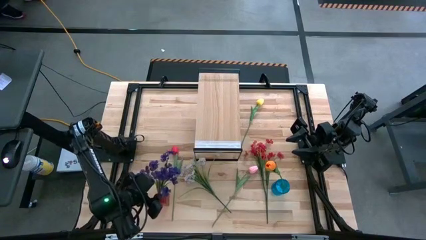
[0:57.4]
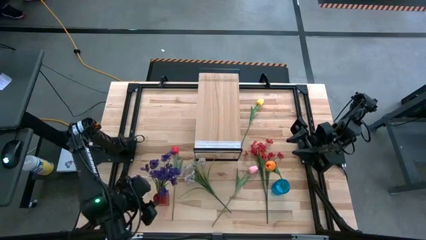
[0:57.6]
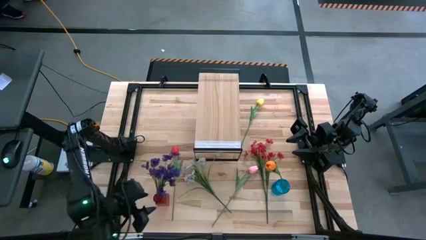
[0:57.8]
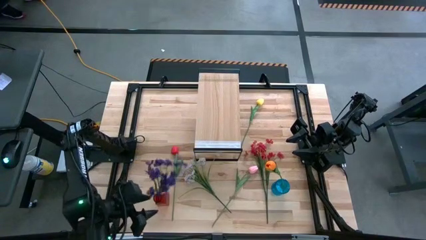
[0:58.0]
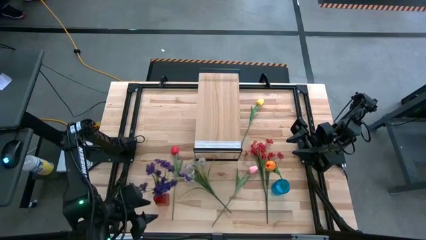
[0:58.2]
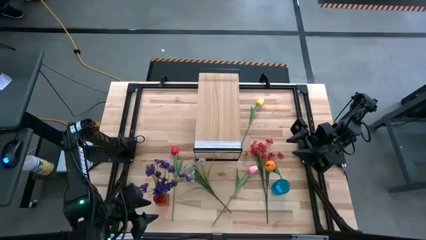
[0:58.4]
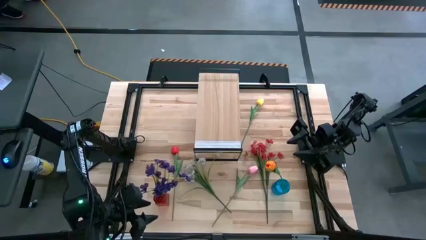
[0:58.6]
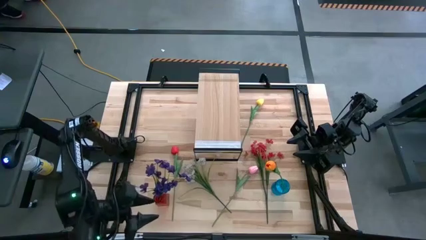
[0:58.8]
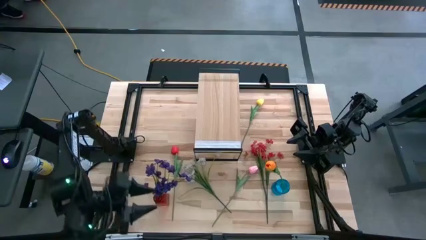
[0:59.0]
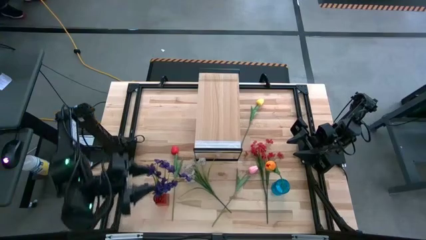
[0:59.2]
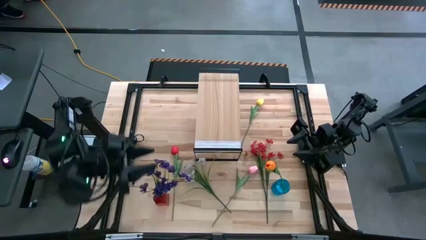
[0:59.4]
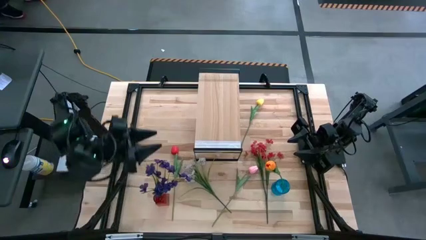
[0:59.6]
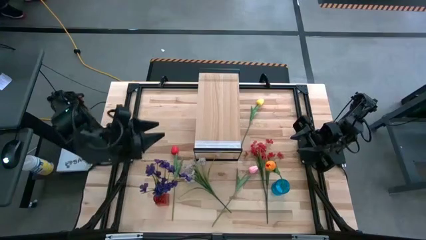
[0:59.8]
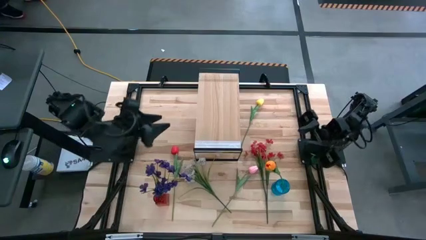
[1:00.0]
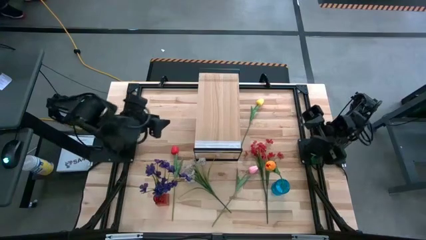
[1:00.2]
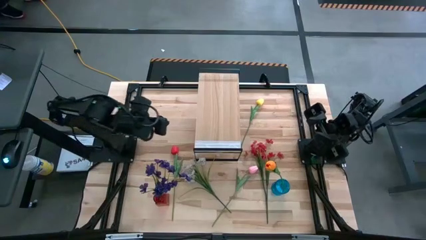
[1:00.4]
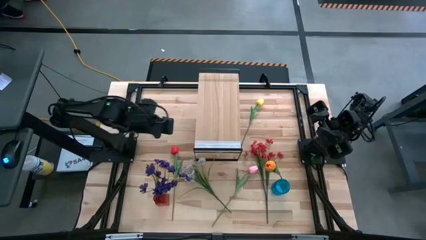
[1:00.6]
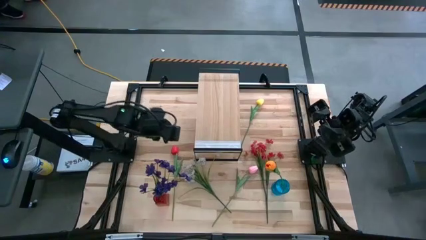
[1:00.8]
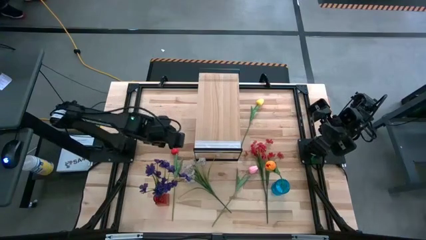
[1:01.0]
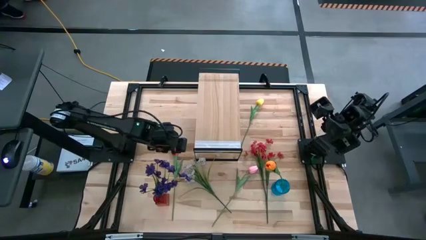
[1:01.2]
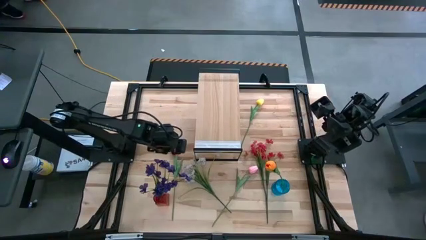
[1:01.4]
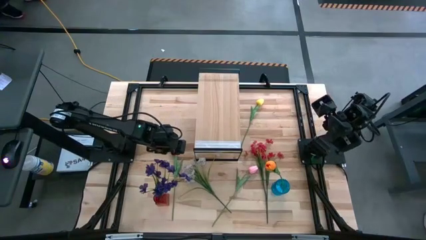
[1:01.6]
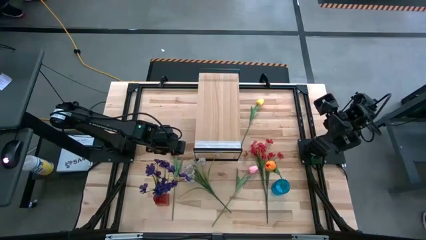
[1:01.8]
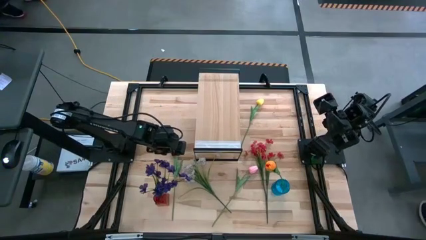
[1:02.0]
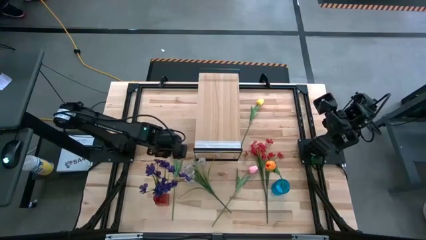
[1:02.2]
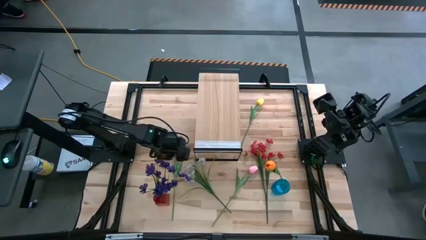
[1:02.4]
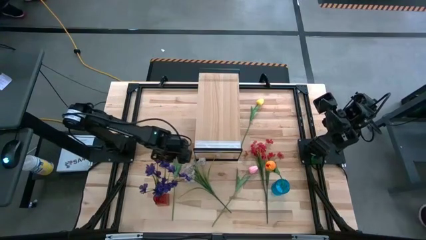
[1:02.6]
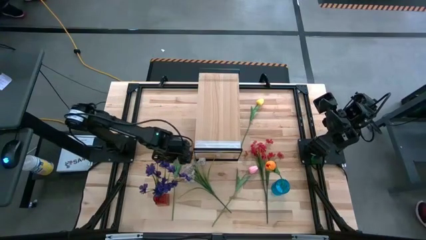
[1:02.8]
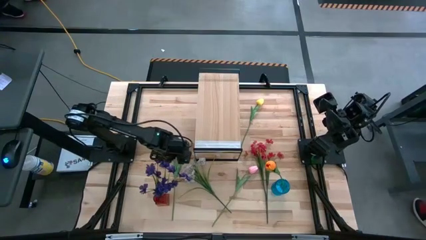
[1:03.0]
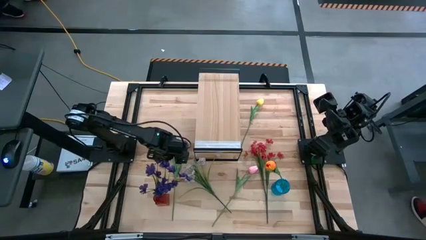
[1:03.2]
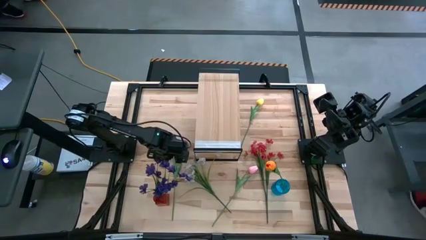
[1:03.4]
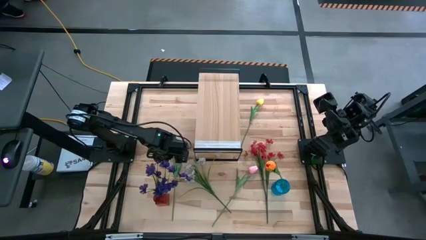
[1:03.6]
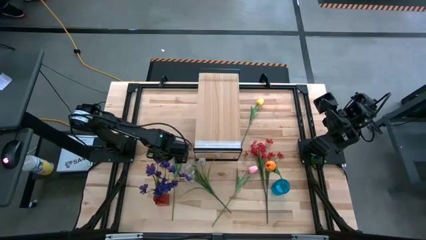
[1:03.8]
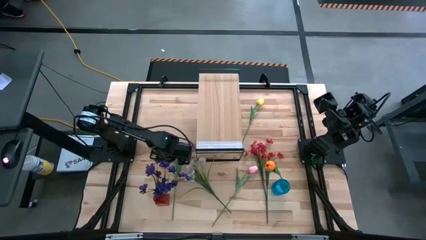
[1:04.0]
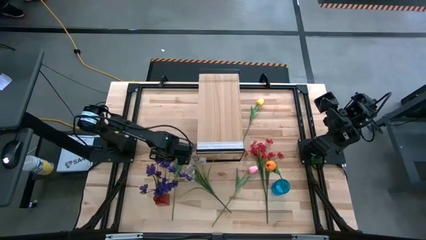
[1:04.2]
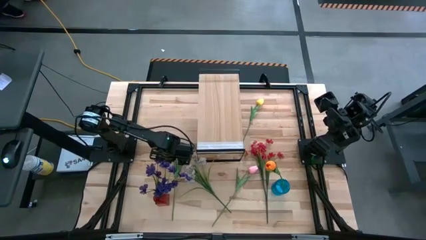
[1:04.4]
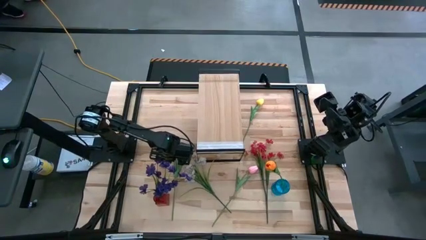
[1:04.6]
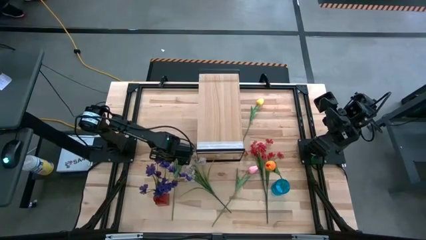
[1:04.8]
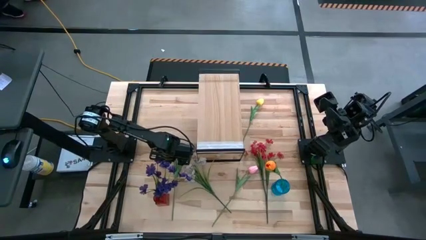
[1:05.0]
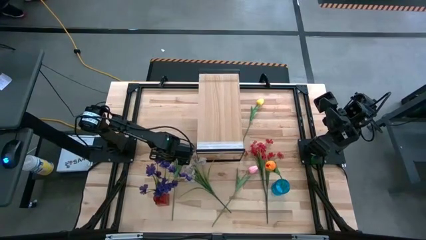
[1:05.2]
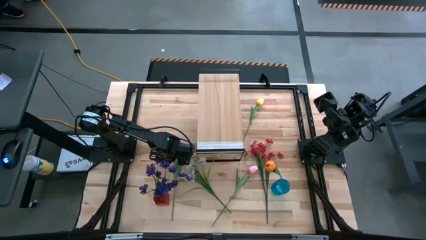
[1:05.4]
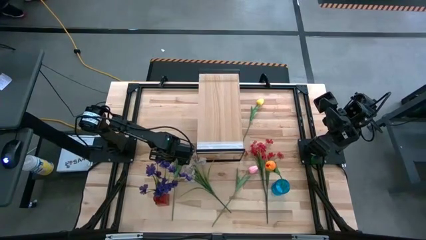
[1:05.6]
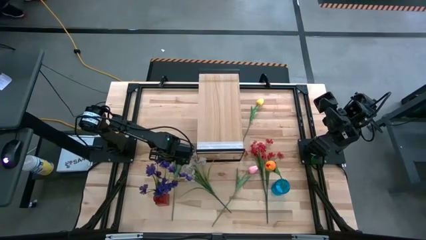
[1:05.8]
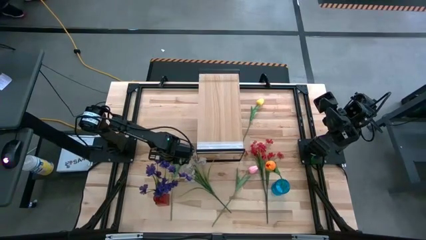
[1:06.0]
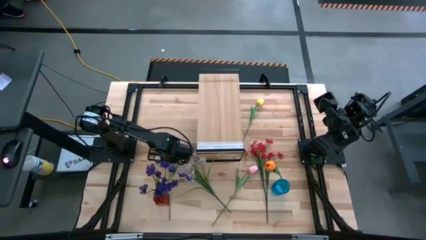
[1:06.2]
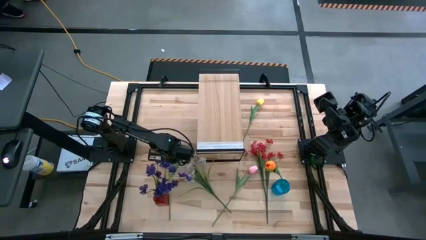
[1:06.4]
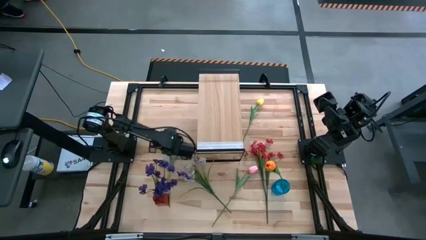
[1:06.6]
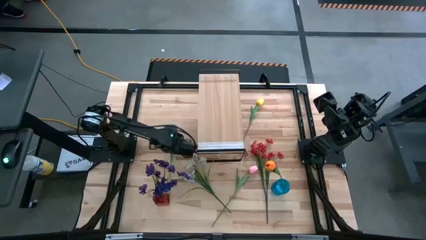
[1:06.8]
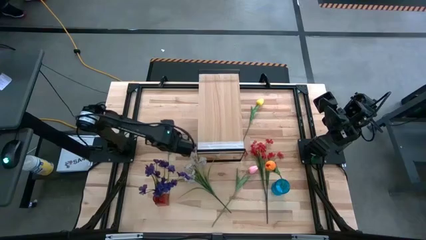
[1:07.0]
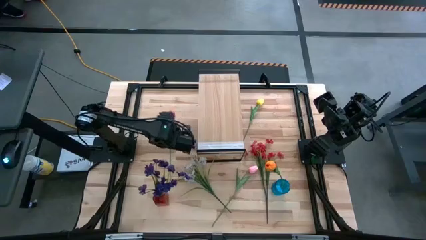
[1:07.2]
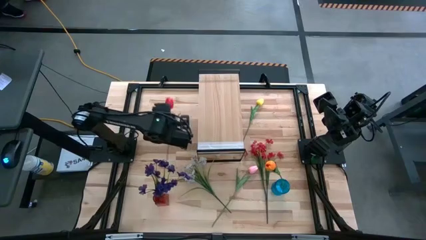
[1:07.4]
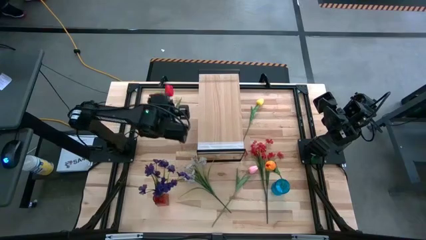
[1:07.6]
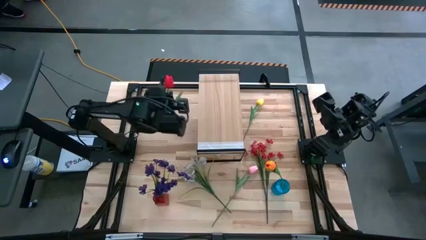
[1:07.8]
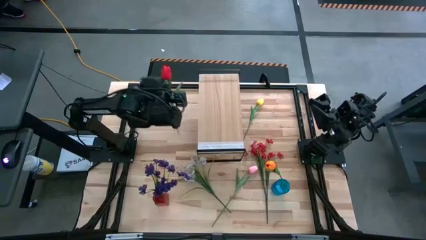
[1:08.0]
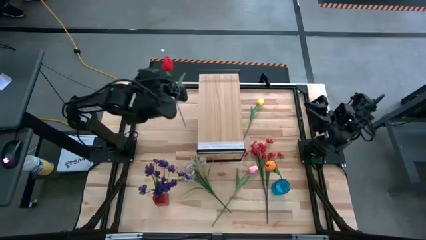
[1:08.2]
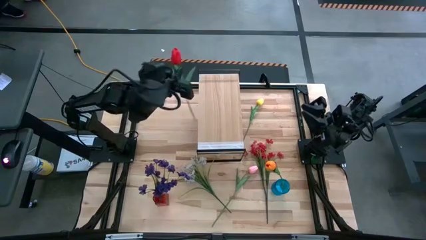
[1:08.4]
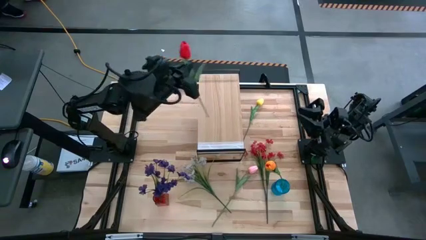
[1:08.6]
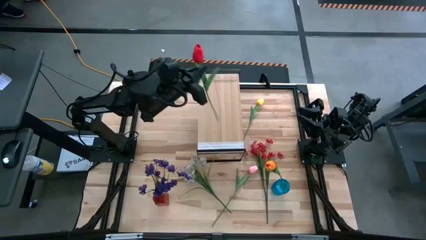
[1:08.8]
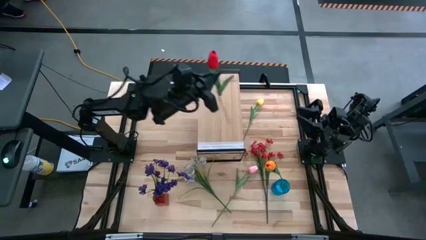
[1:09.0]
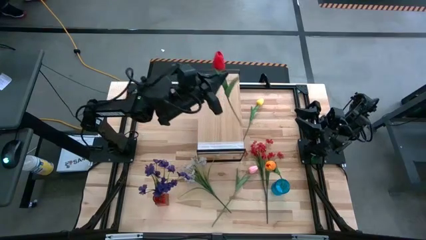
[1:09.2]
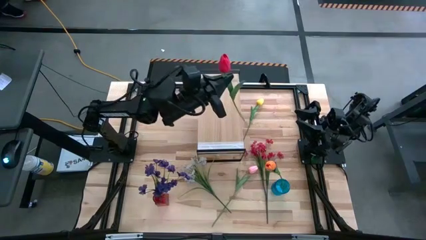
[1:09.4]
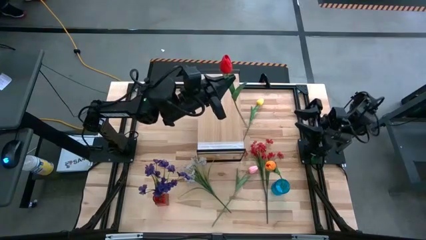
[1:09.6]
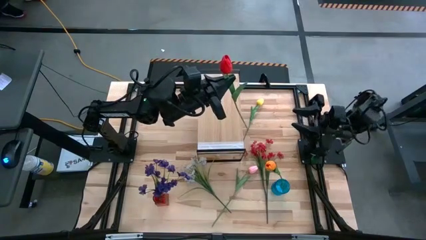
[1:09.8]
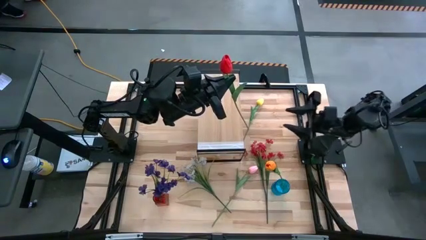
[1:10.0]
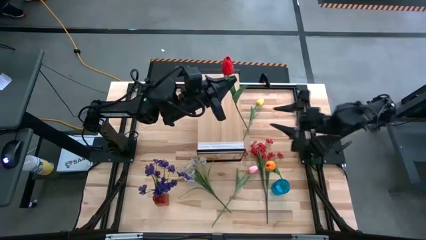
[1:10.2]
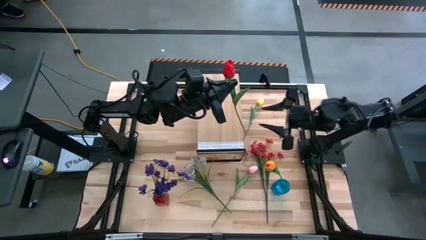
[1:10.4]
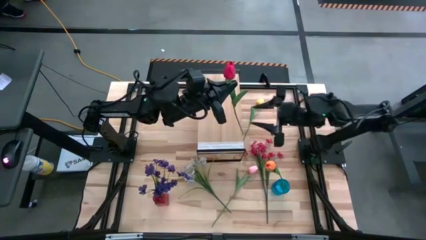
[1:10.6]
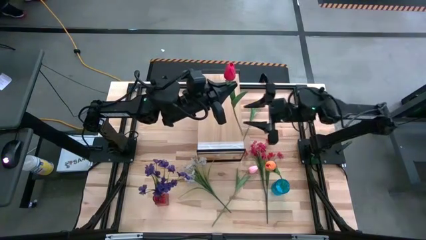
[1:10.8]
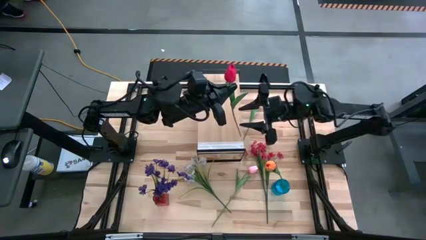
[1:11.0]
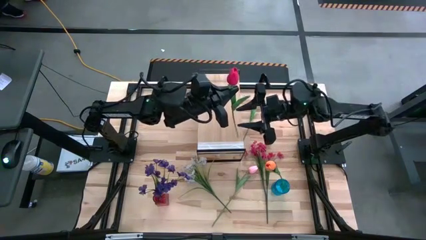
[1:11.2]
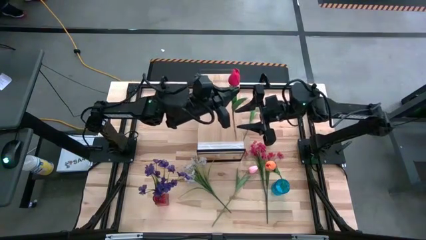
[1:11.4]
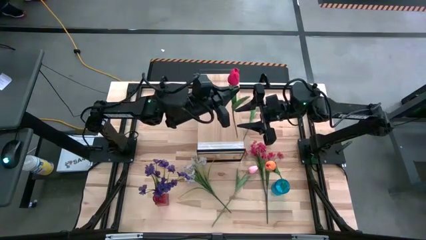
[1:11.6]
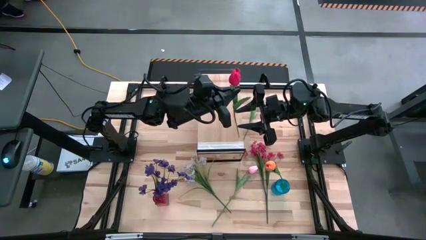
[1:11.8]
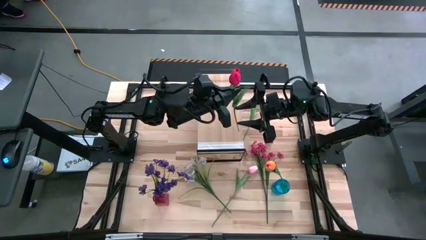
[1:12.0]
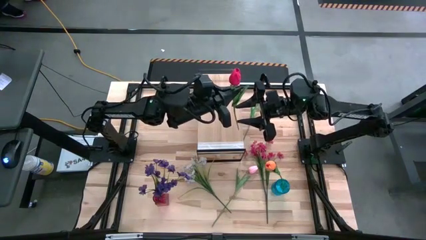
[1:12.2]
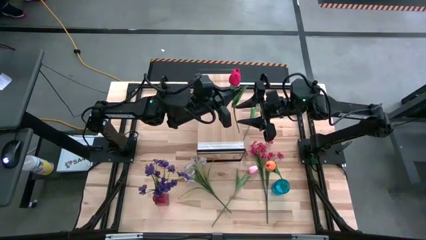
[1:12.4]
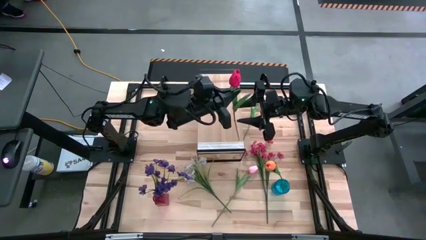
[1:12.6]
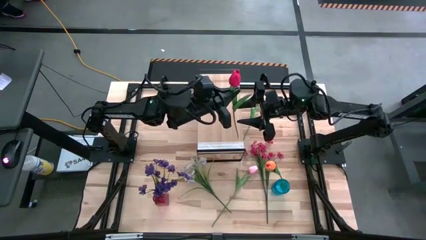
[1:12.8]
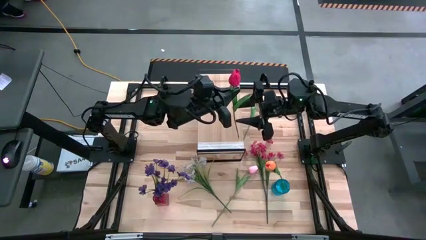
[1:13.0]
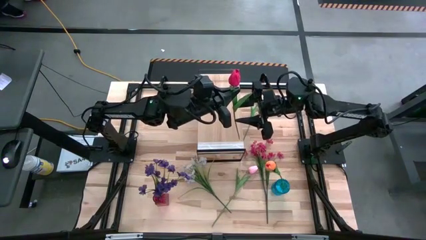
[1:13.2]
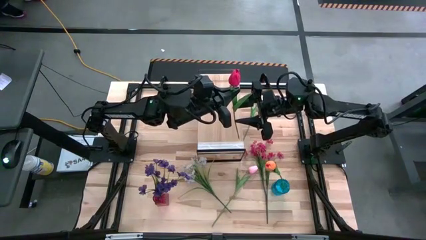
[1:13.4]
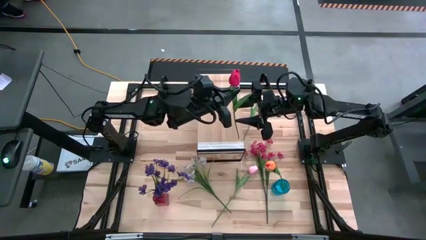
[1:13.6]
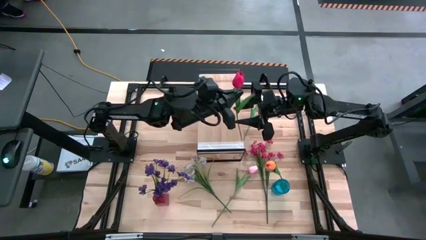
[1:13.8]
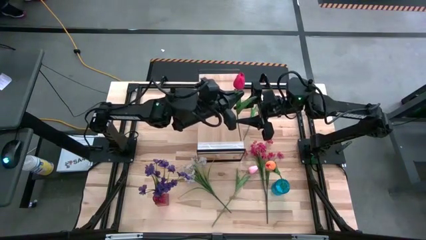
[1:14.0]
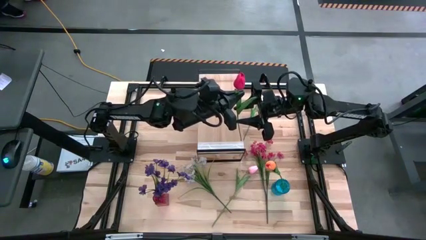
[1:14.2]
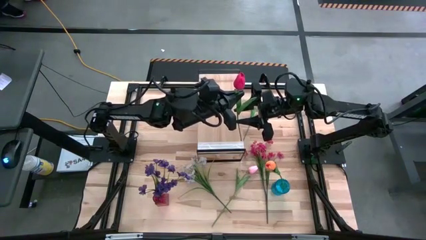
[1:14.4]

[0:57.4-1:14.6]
Task: Pick and place flowers into a vace then onto a shelf
Put the red tulip into the blue vase
